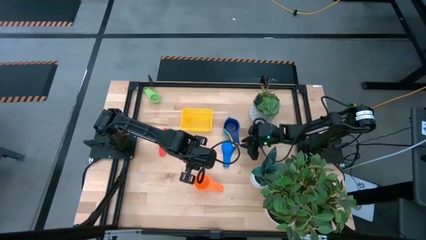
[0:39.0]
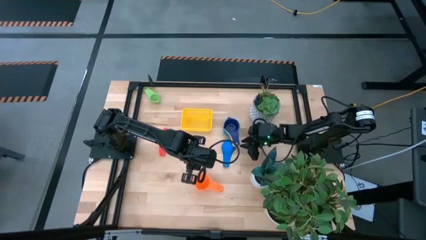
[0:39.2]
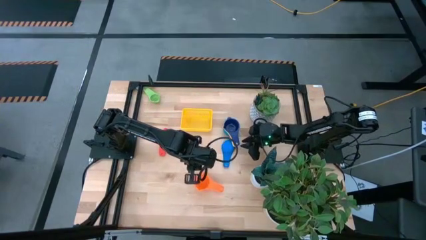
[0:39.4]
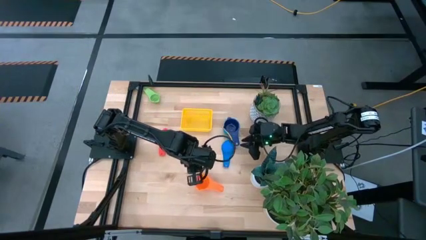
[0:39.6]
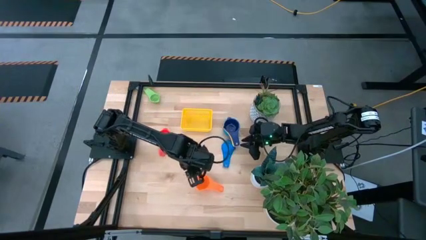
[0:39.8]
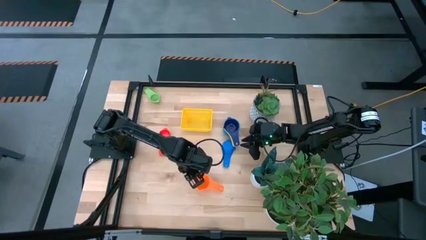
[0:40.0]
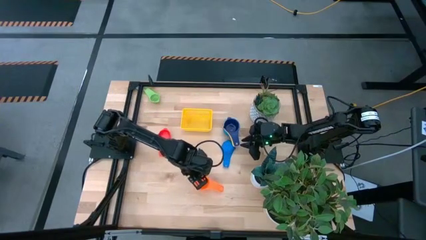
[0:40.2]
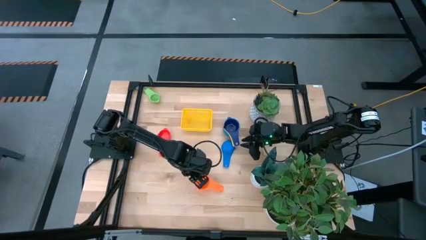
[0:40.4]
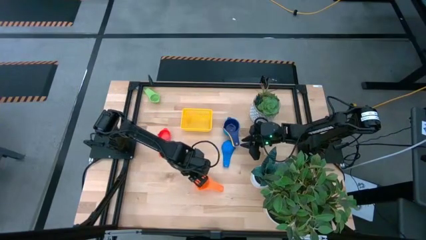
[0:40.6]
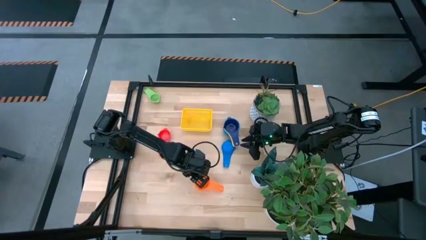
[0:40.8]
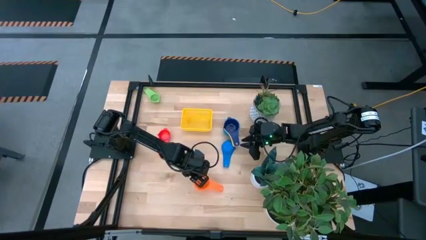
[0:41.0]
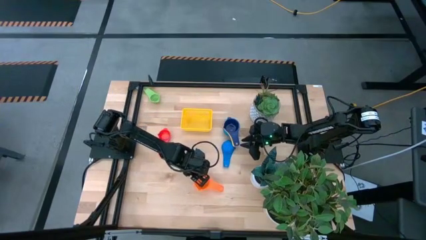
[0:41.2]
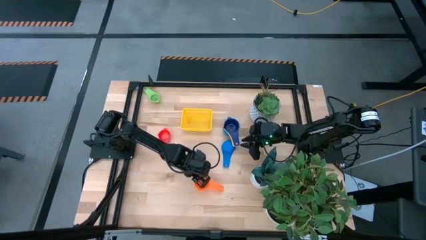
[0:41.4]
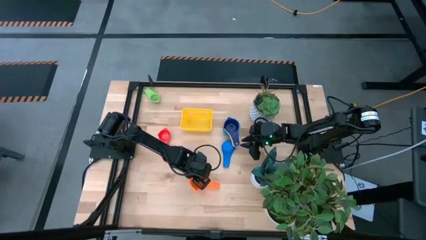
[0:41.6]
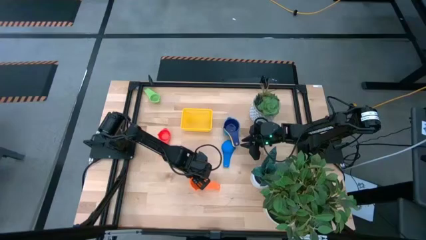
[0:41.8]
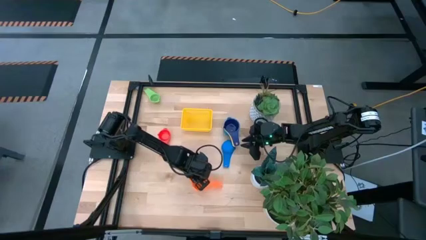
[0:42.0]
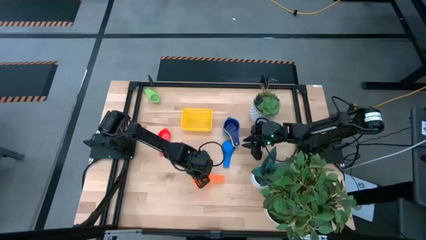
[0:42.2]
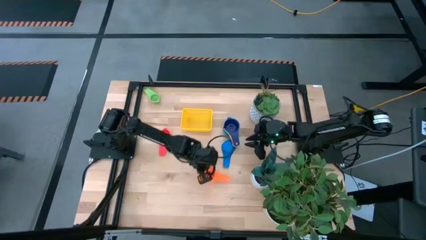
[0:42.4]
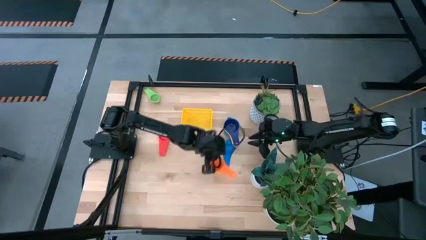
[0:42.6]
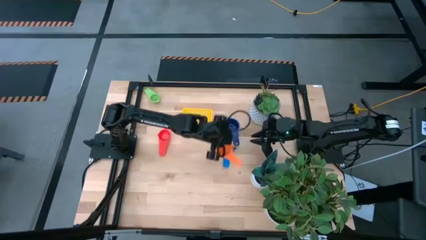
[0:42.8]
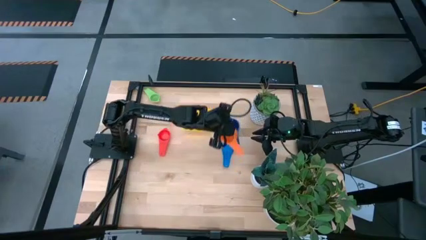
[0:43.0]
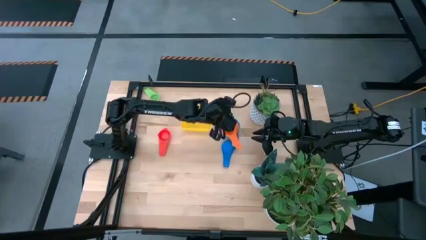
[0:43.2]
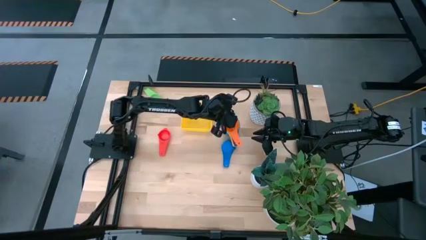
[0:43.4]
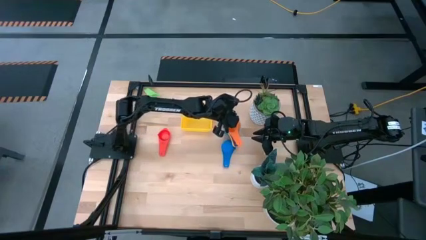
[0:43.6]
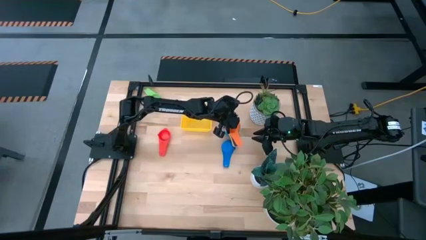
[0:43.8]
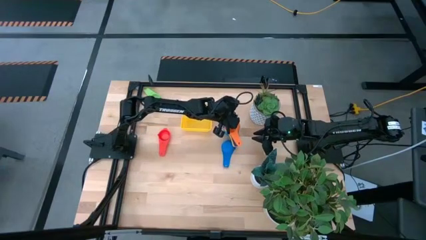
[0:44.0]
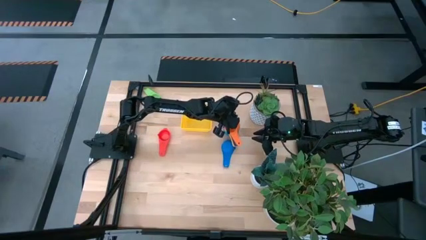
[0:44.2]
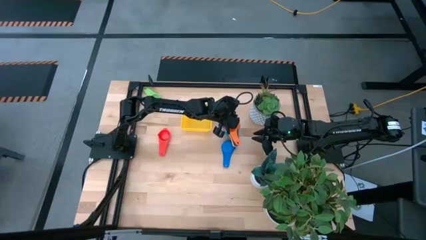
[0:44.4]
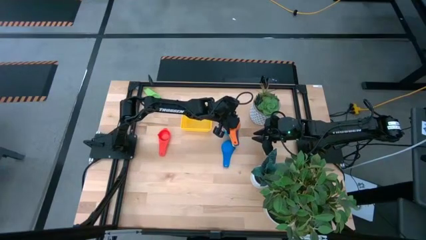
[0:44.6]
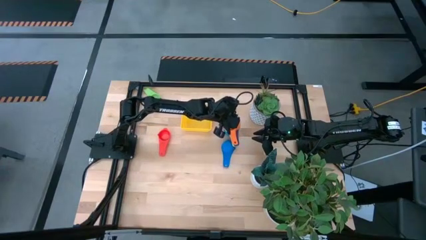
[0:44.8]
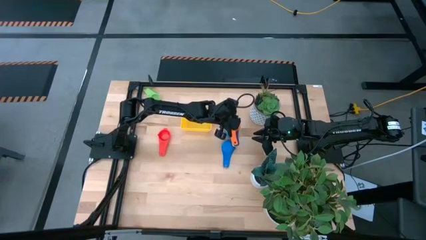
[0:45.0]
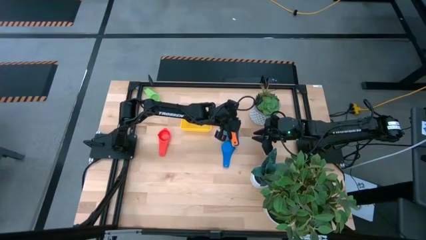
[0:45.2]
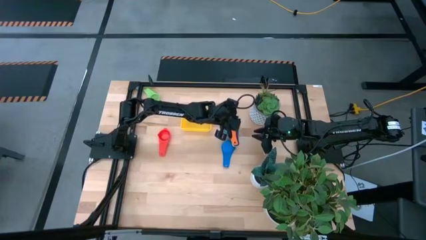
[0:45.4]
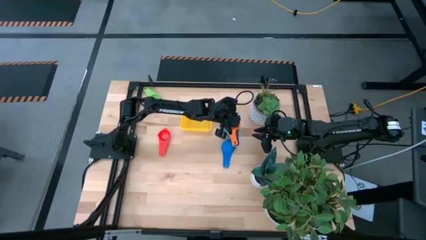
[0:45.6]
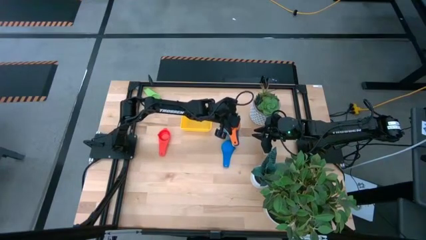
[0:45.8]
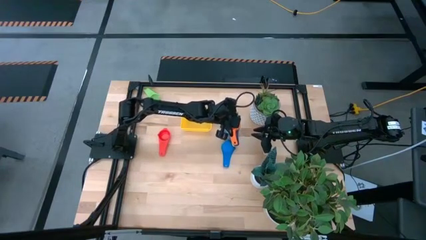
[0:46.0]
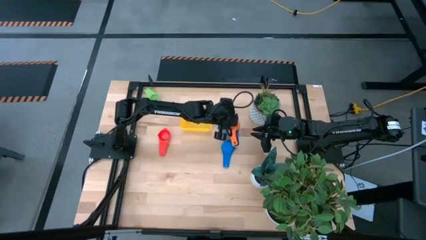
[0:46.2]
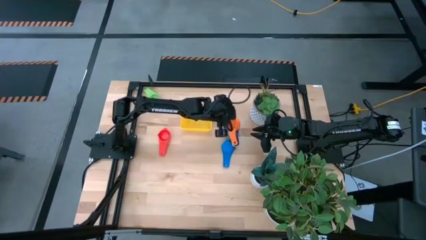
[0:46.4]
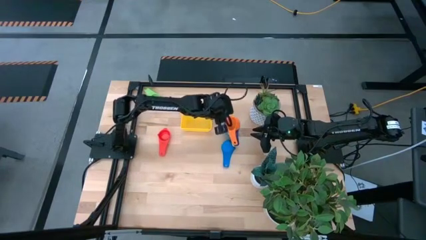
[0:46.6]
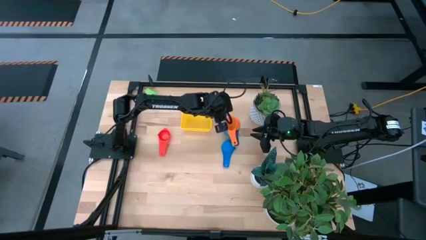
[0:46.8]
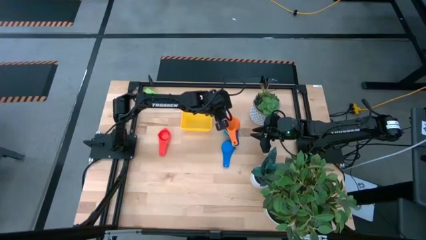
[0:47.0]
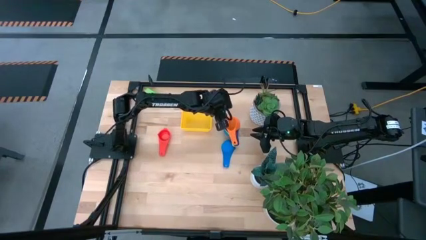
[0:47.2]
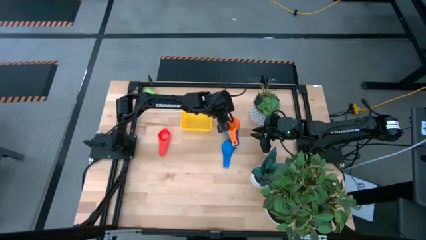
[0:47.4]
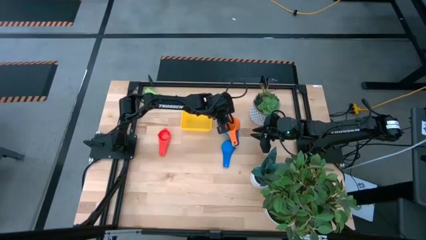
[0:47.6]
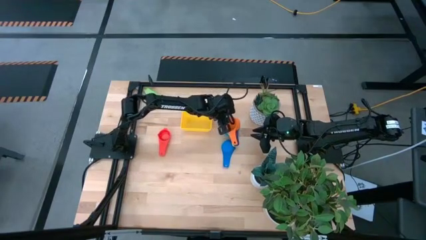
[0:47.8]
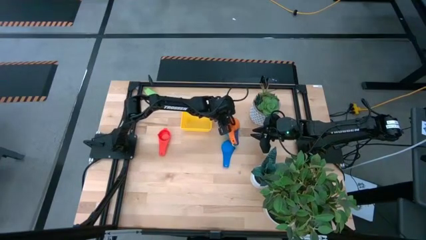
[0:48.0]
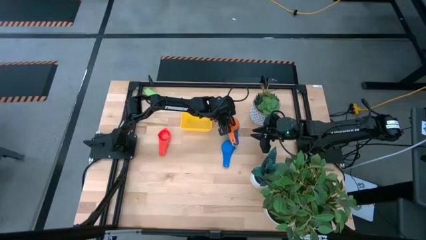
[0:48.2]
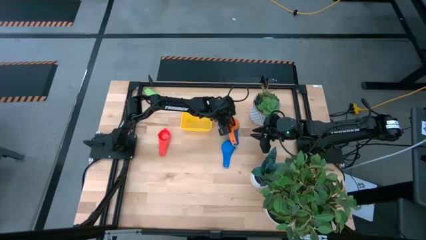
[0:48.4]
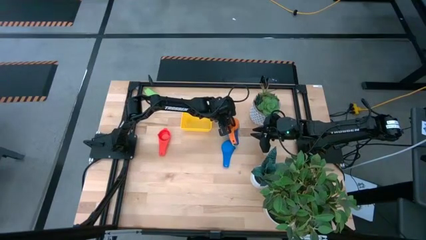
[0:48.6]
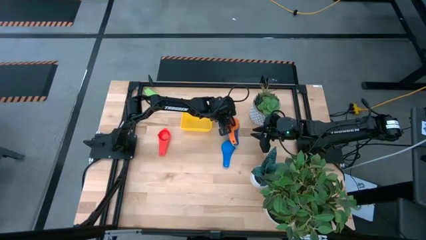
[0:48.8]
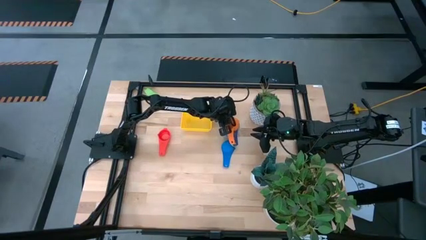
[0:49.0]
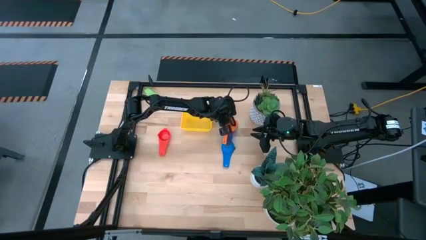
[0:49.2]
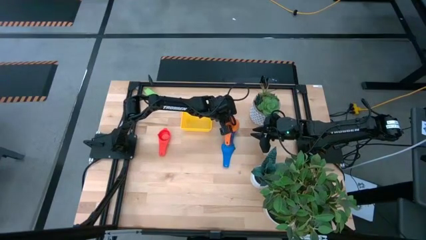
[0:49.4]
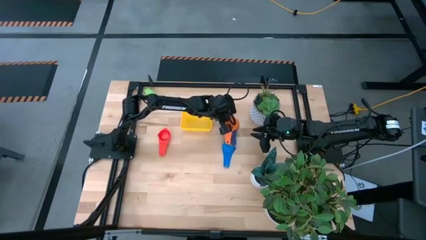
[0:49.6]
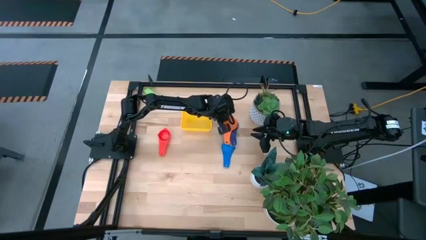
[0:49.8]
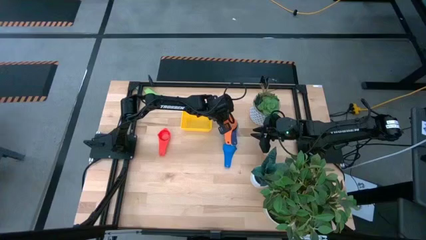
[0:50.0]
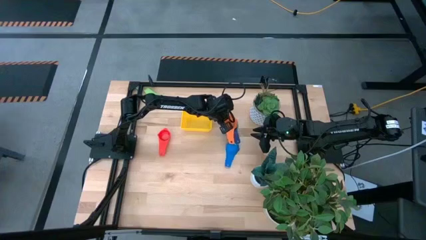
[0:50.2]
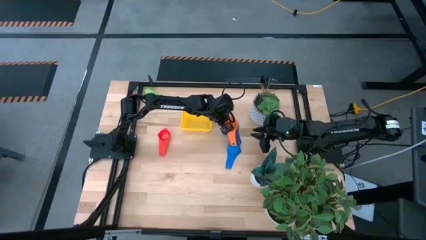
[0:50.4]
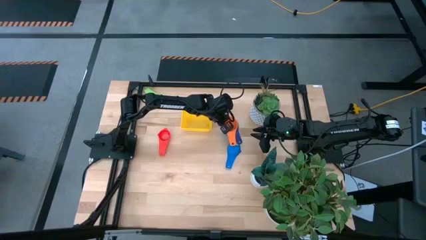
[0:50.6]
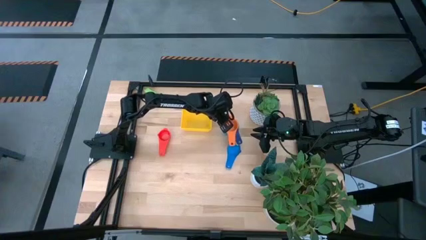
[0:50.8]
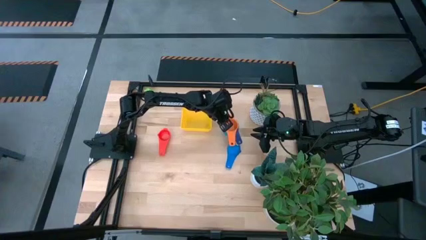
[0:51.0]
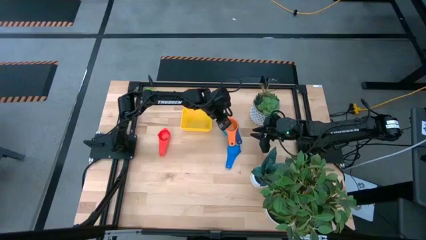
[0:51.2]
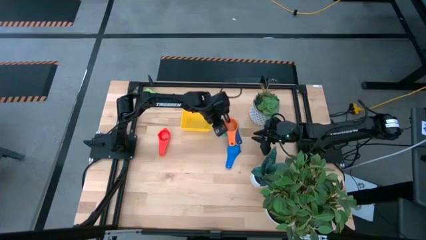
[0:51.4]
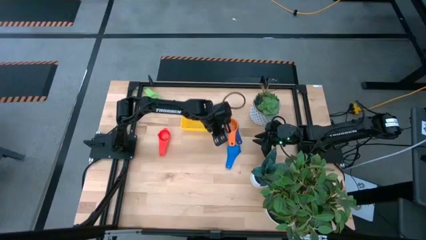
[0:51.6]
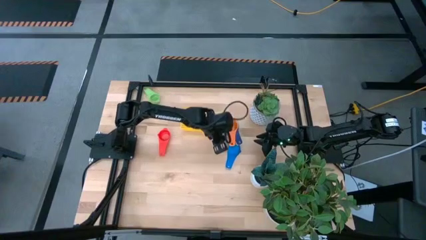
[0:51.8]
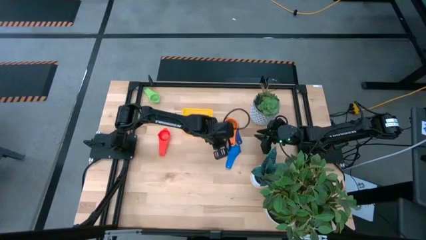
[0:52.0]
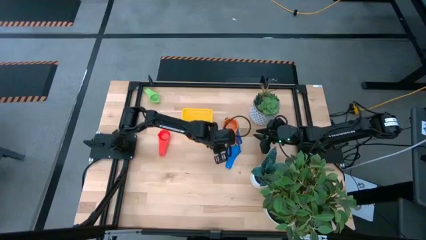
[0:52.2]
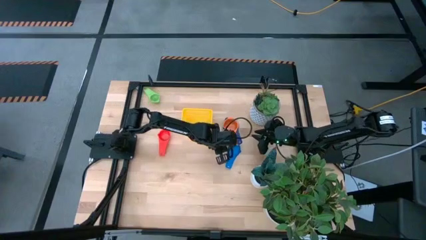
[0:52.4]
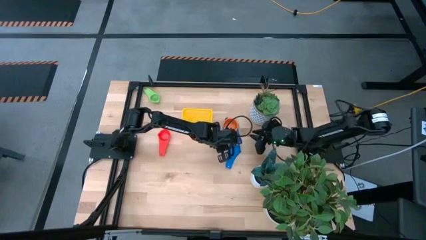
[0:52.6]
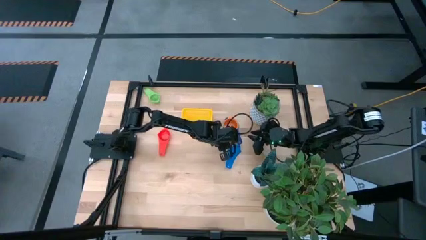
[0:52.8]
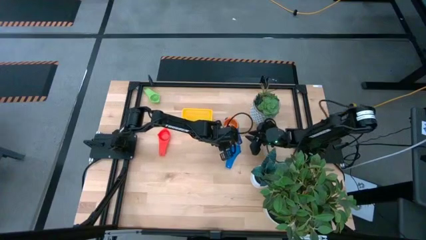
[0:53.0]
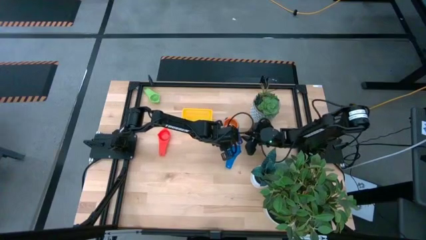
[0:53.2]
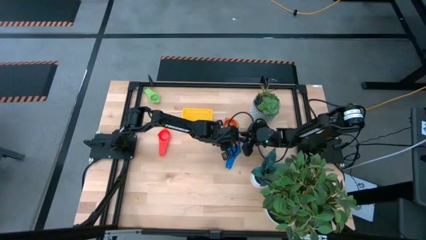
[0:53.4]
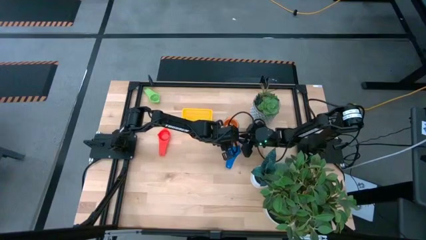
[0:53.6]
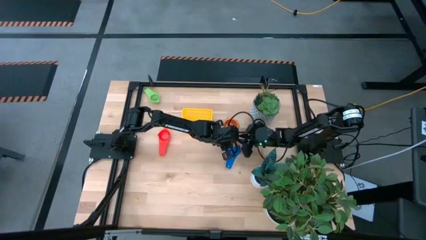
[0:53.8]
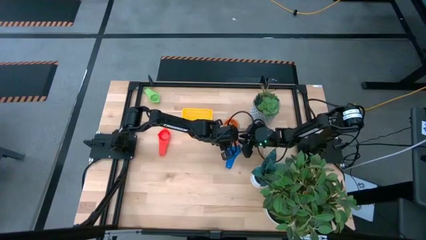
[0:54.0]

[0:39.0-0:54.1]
Task: Nest measuring cups in basket
Stack the orange measuring cup into the dark blue measuring cup
